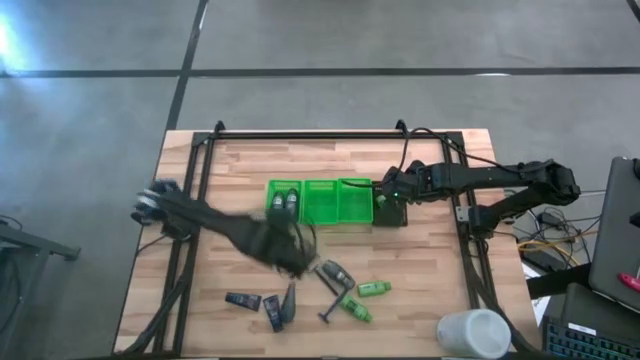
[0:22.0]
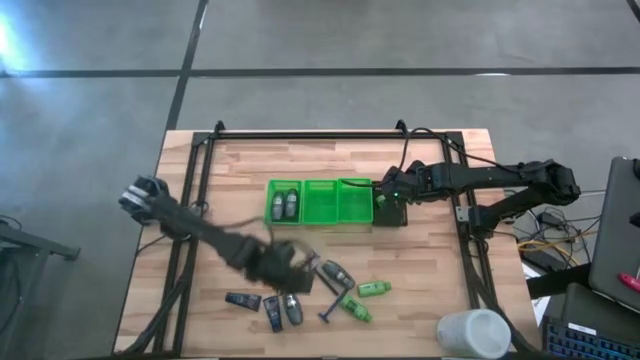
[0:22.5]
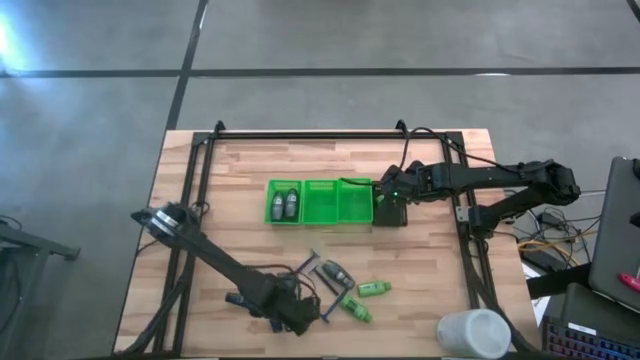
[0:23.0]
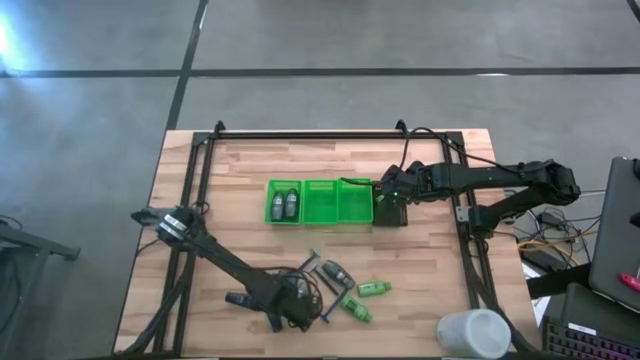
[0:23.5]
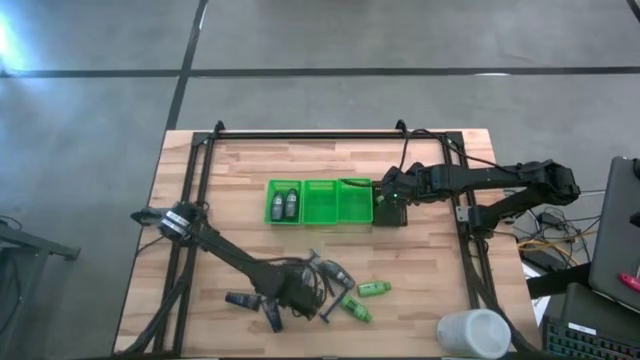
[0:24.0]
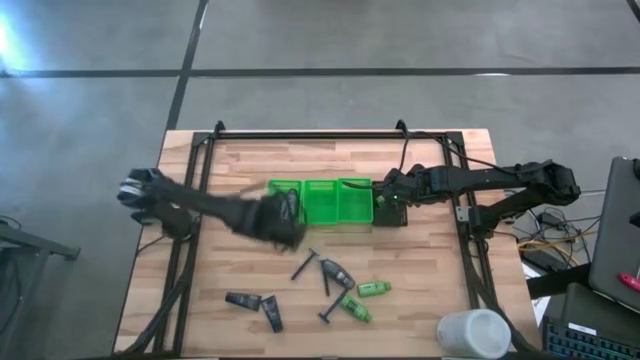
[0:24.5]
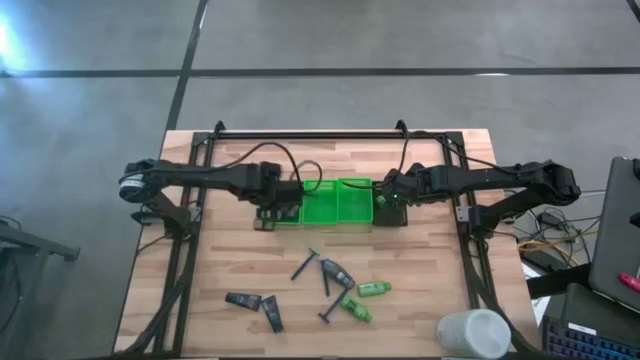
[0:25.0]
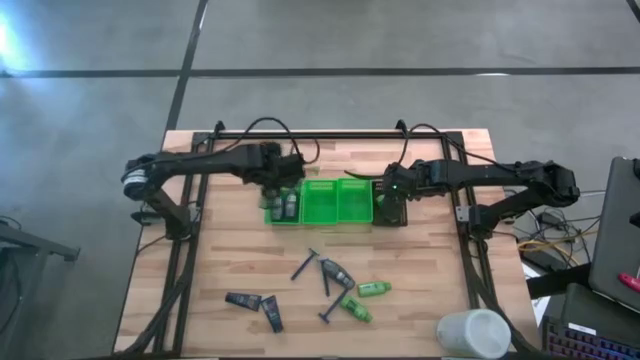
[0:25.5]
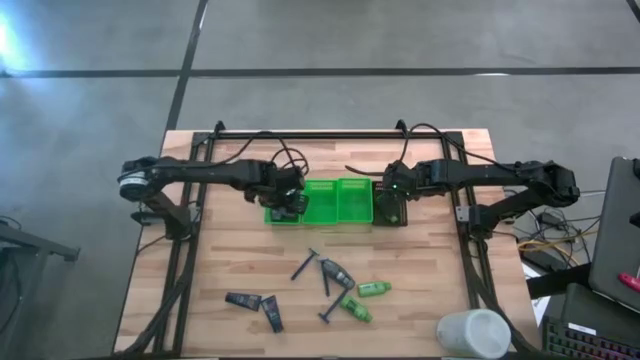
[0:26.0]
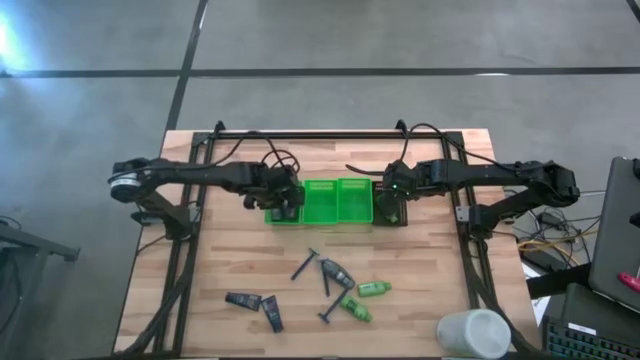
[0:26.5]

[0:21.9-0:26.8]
Task: Pick & Place Travel size toiletries
Put the deodorant into the left green bin

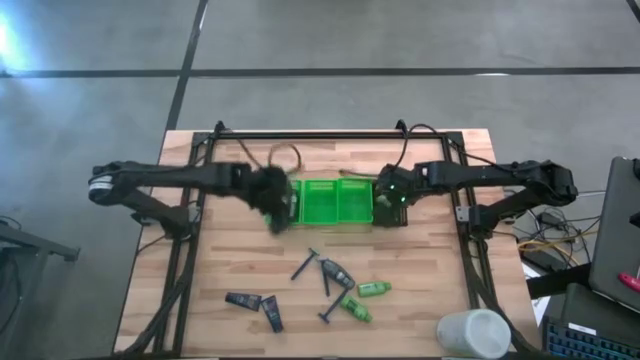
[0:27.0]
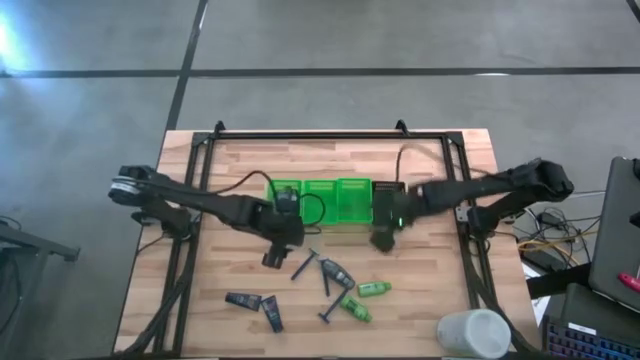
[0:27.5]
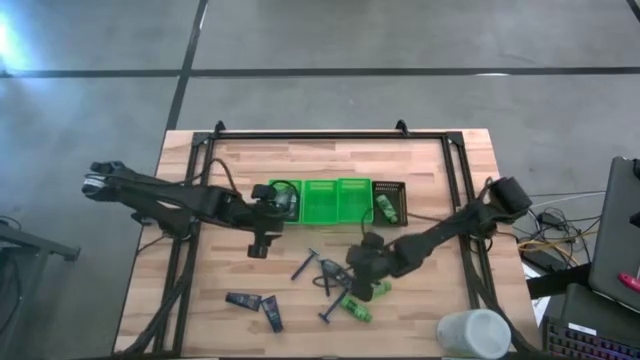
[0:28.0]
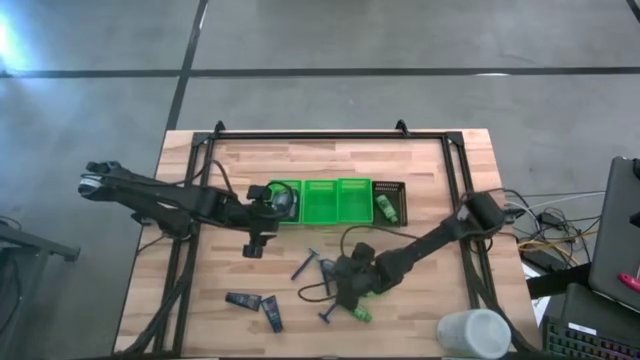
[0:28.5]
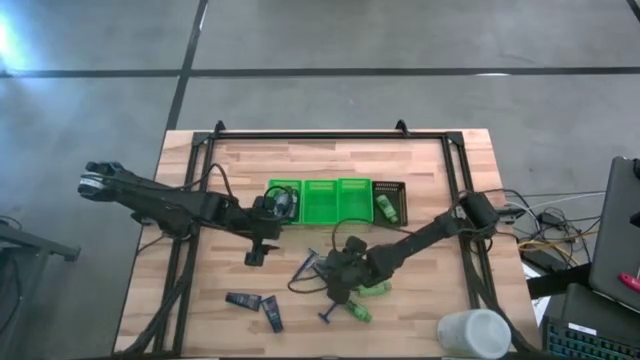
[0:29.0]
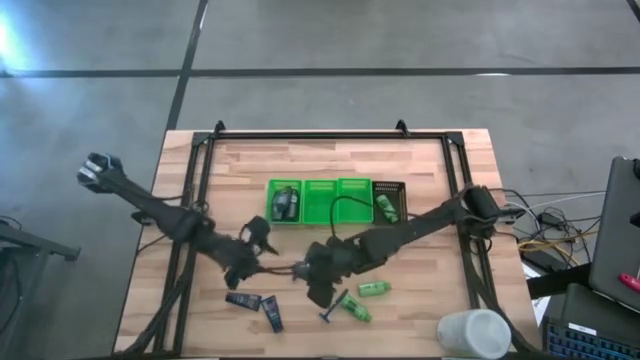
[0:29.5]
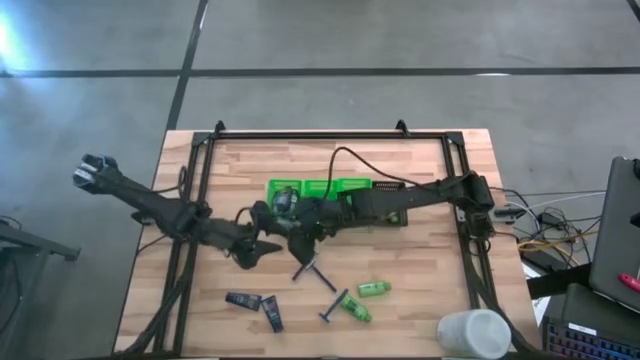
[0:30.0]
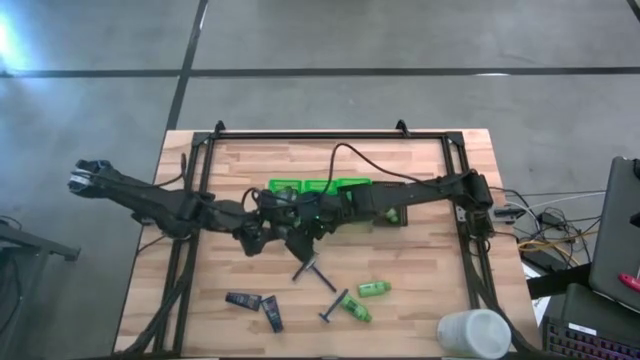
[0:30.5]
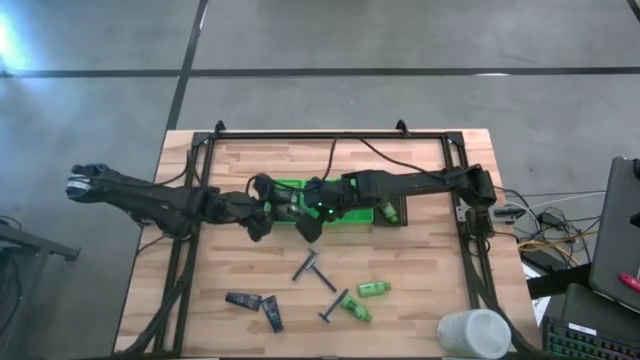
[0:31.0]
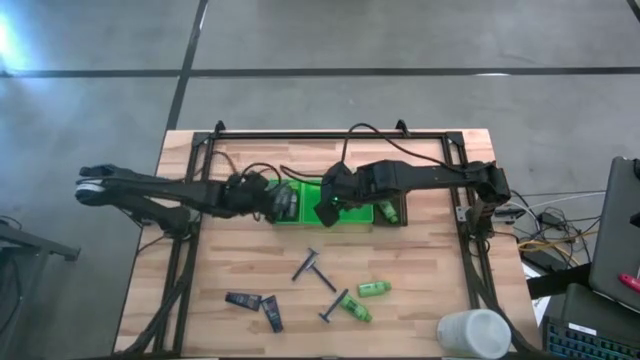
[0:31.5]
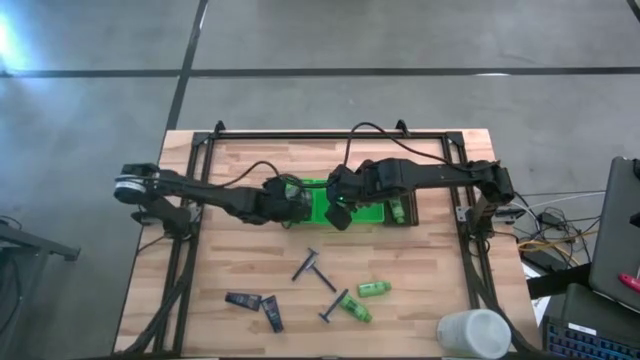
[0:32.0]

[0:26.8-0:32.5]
Put the deodorant into the left green bin

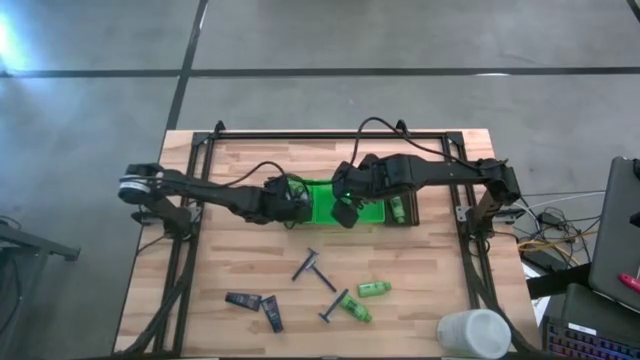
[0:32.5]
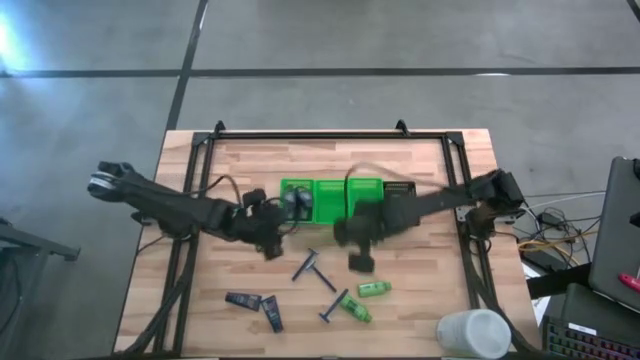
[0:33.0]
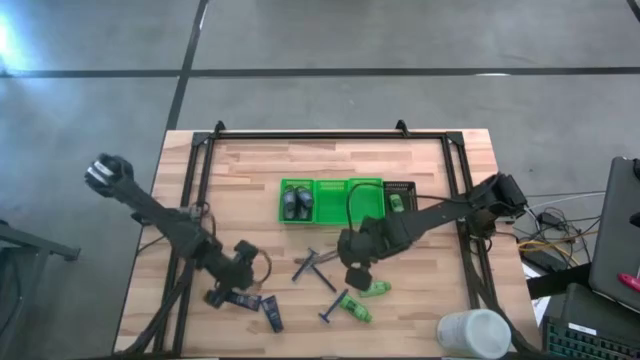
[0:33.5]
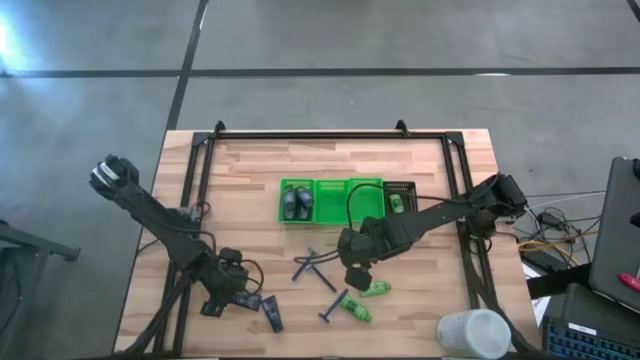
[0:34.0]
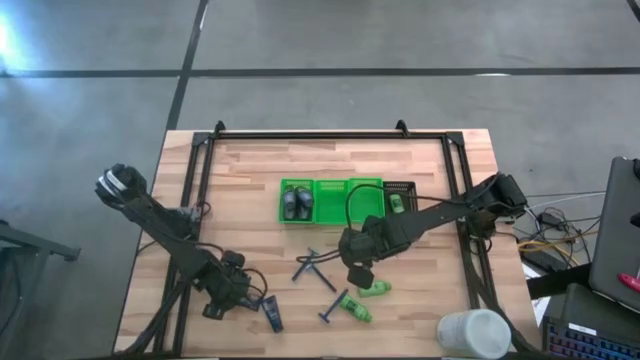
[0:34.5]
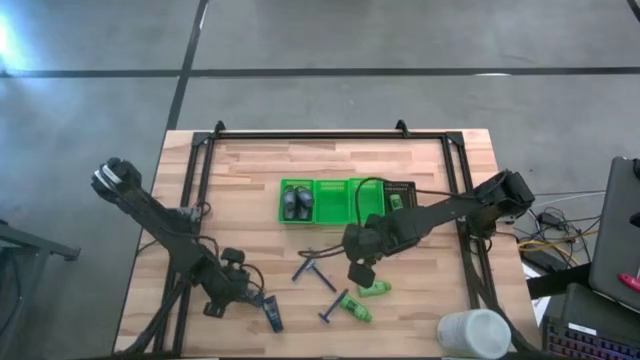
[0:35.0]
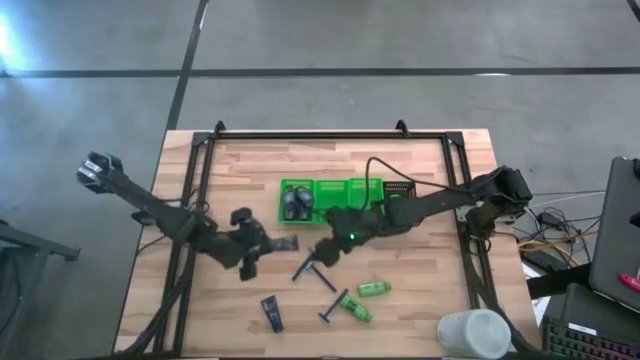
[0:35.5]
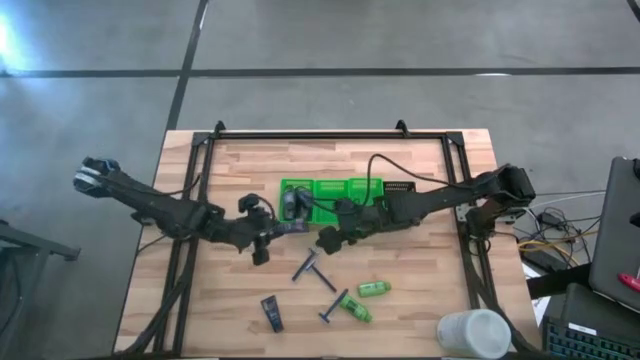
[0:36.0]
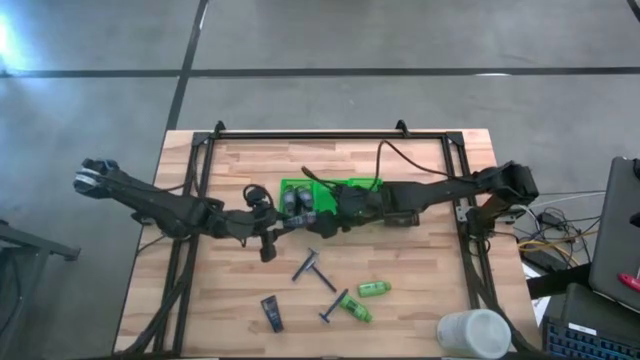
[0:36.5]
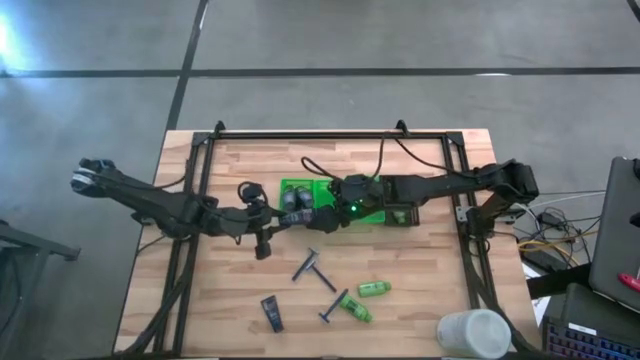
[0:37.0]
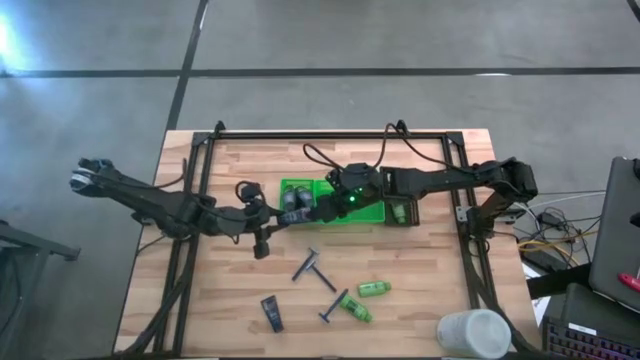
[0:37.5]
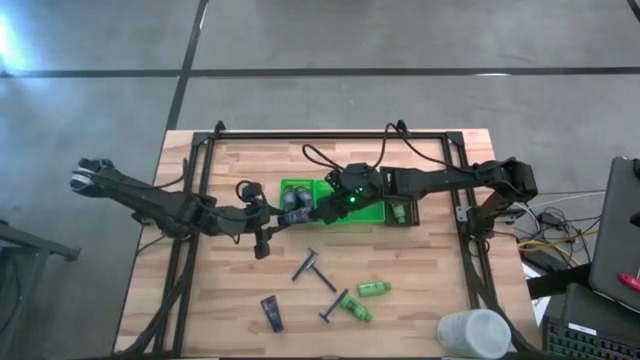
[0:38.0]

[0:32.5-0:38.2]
Put the shaving cream into the middle green bin

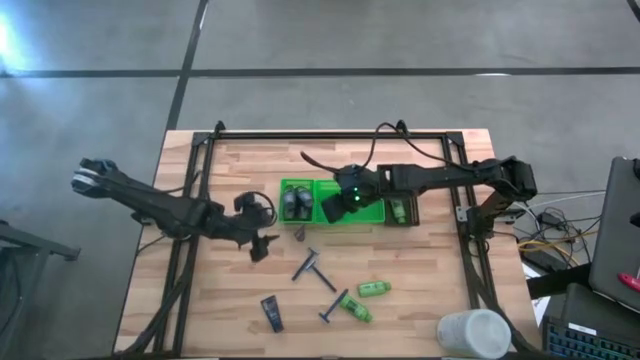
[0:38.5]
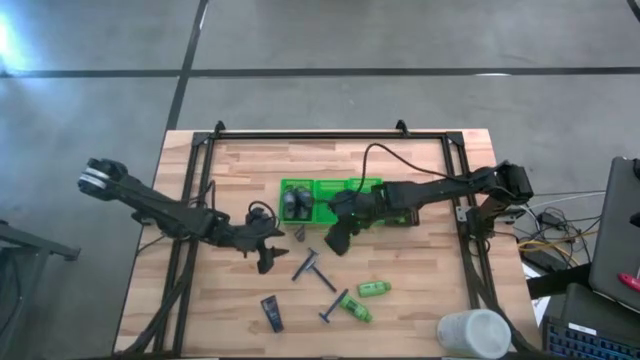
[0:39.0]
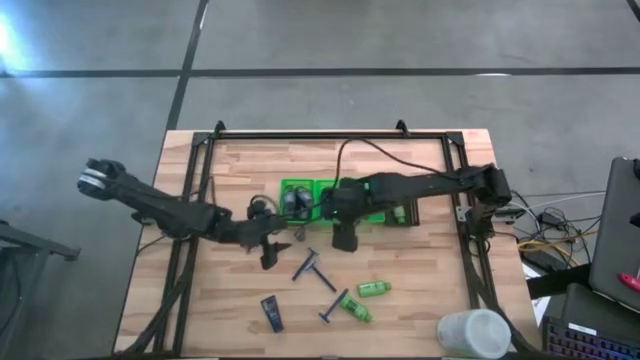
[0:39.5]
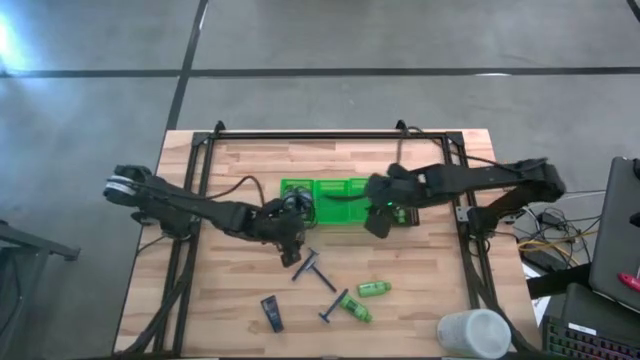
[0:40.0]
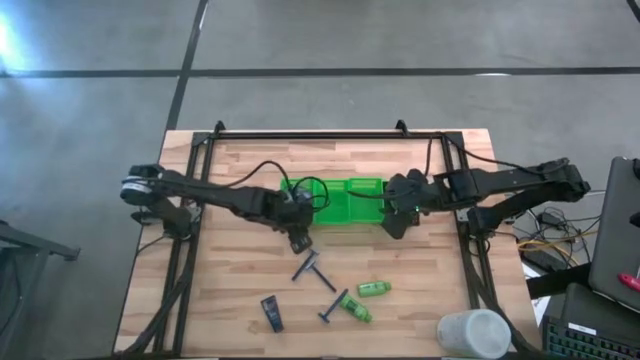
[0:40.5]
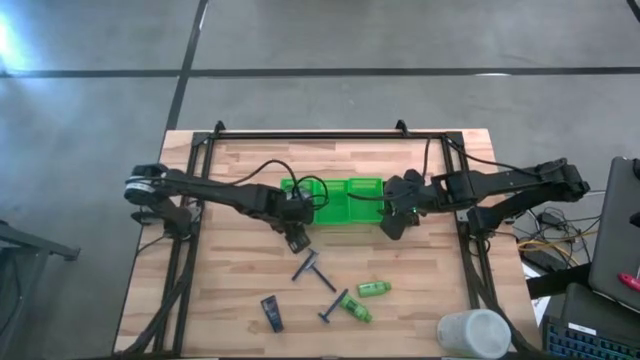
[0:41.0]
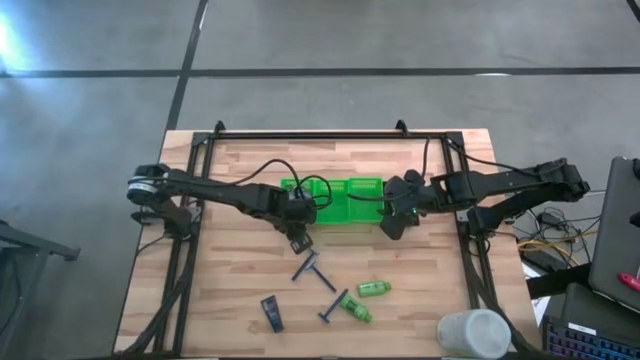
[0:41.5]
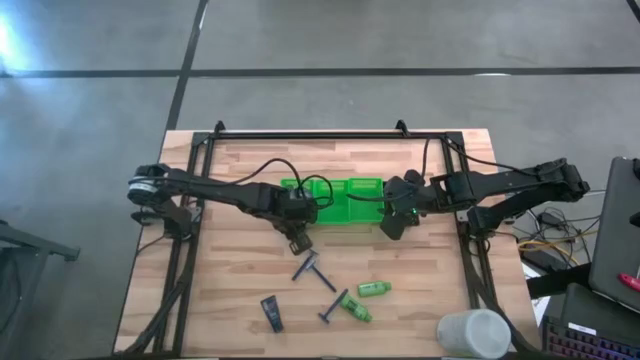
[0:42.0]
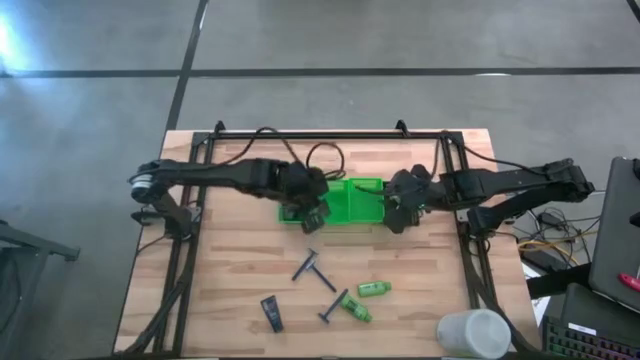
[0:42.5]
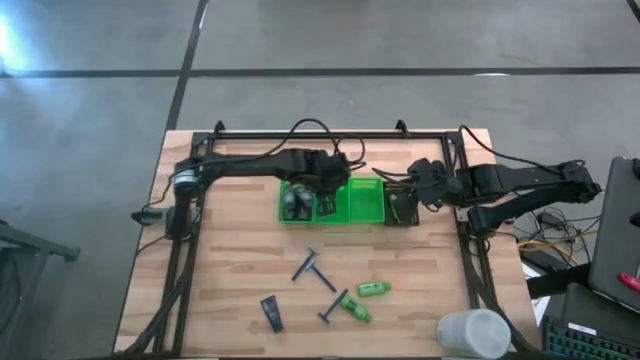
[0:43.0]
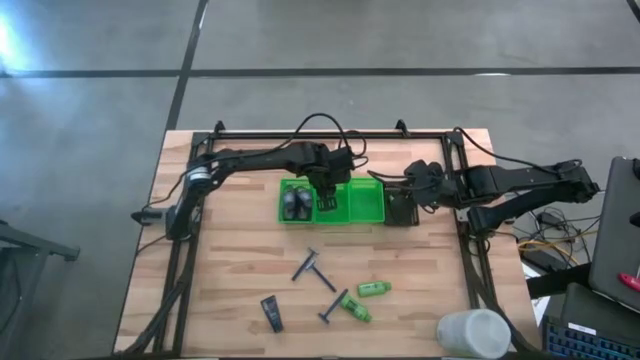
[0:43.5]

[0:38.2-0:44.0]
Put the shaving cream into the middle green bin
